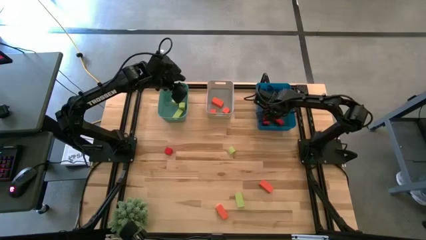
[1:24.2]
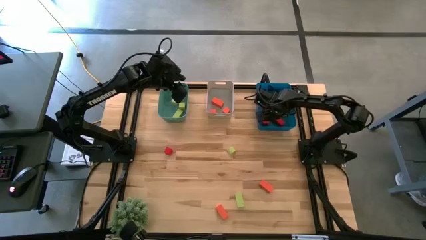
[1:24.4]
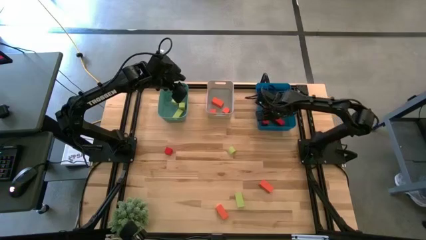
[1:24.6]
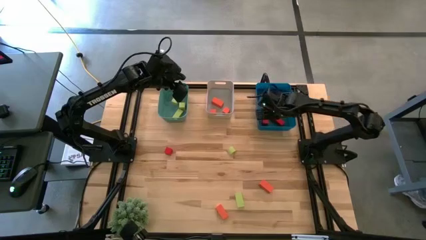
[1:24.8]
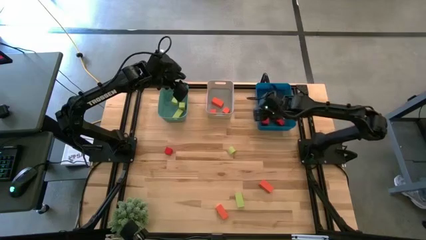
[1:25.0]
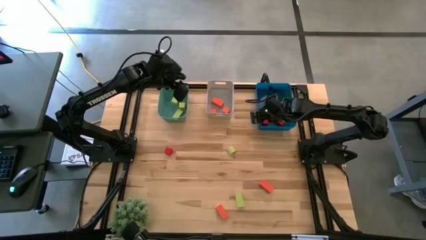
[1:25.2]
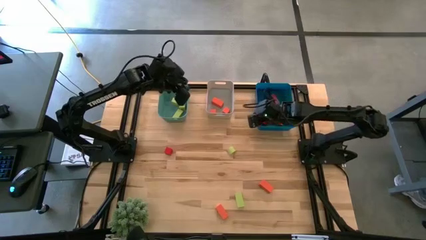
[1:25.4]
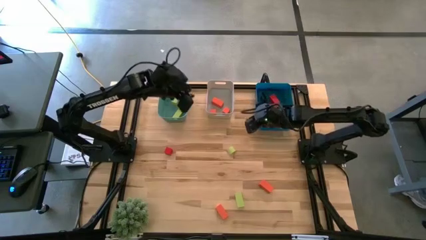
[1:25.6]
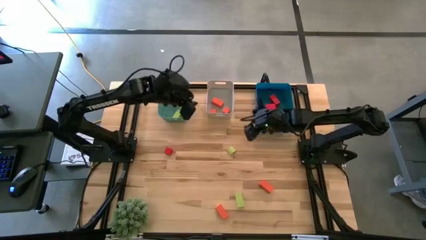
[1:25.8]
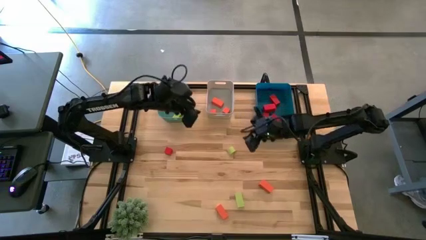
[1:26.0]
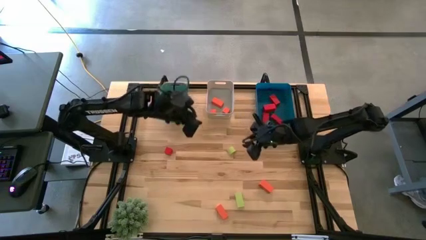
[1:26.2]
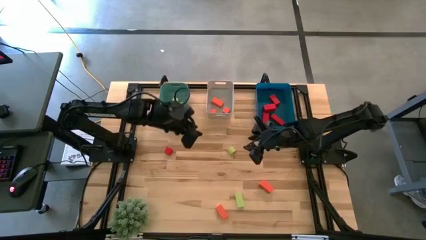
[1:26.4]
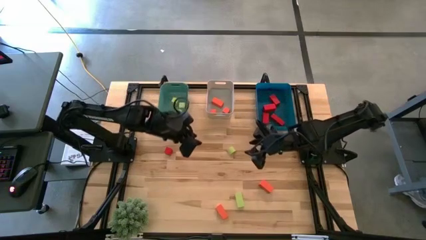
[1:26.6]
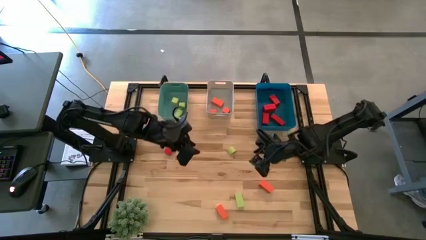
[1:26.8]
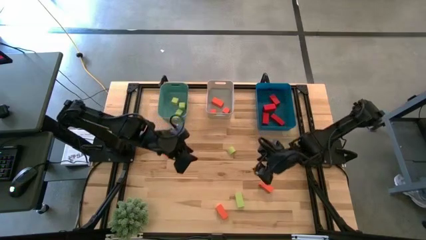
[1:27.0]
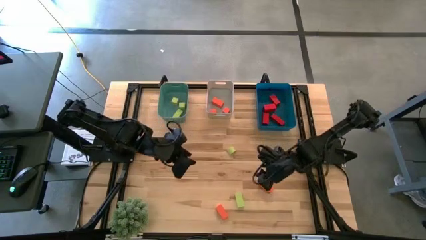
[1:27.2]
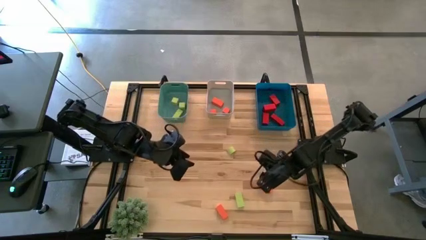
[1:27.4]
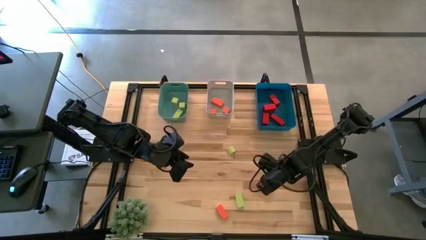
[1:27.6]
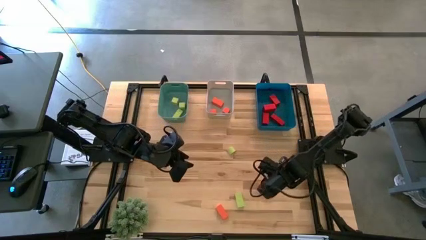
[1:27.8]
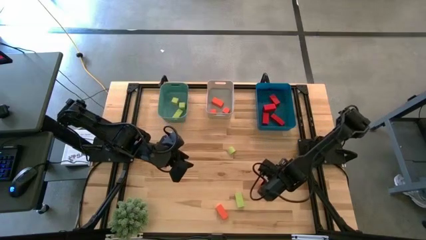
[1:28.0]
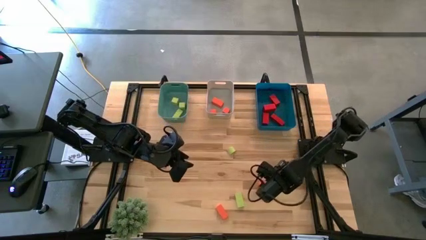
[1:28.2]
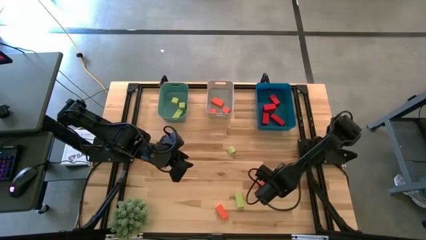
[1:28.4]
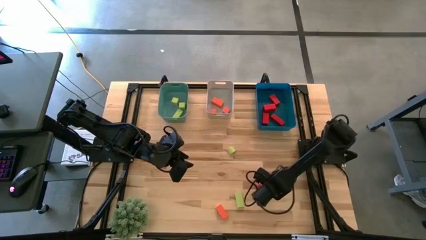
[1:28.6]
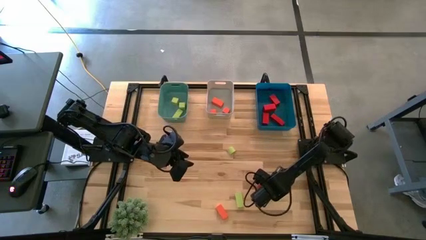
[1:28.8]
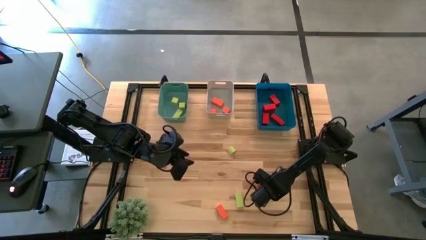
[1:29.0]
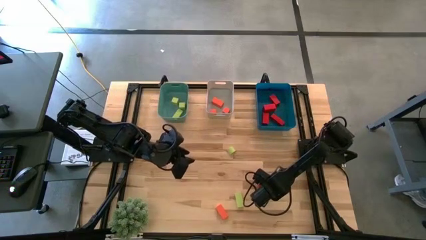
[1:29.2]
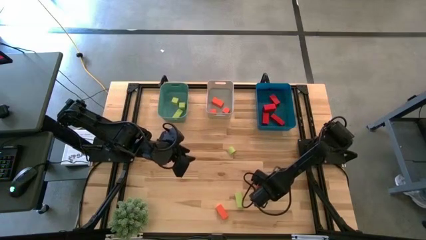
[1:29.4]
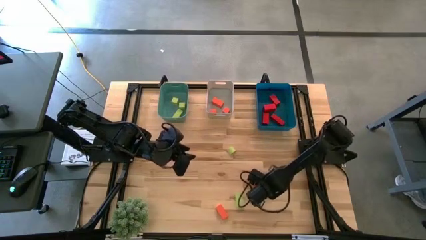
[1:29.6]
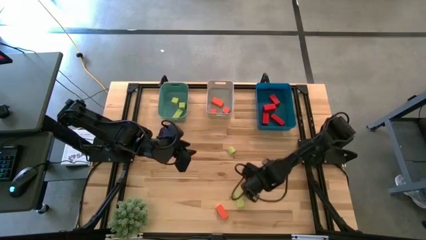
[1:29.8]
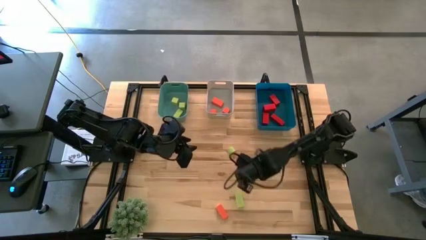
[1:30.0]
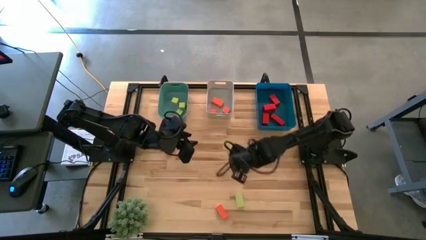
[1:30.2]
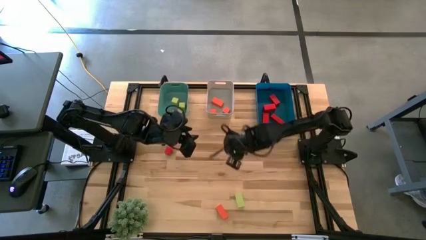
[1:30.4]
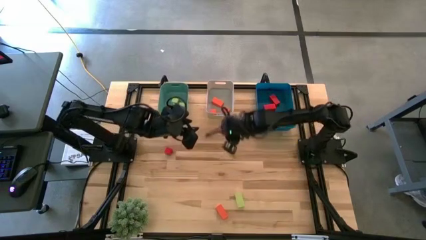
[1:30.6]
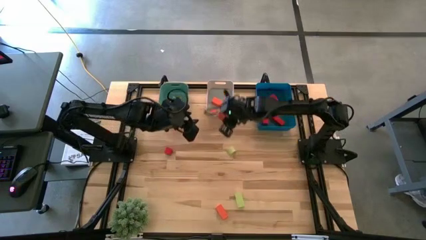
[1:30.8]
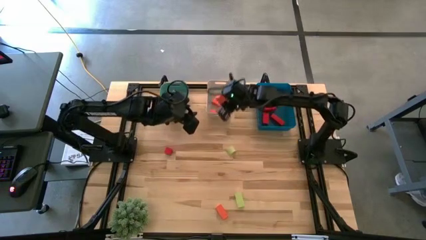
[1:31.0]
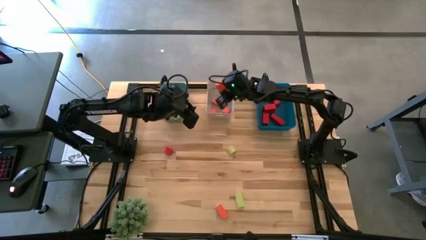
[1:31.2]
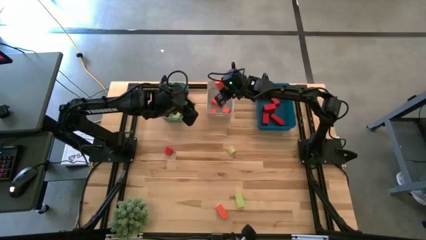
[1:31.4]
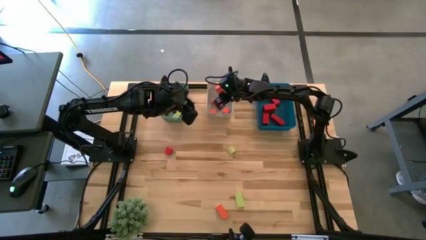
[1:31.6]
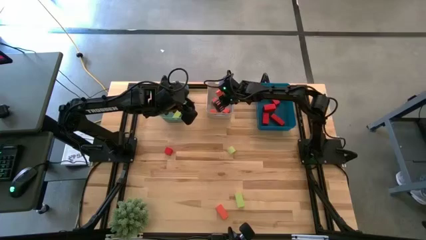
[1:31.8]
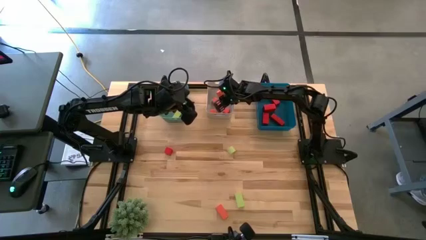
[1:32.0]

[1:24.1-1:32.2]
Task: Sort & place blocks by color
Put the orange block into the gray bin

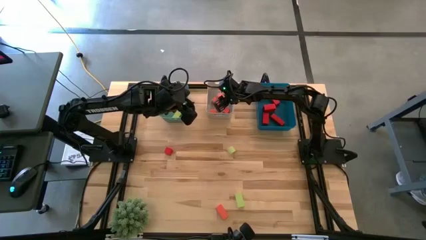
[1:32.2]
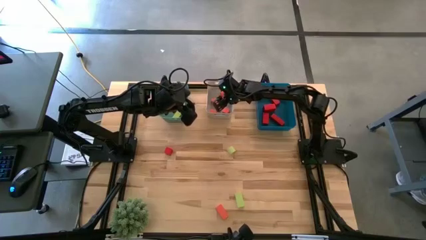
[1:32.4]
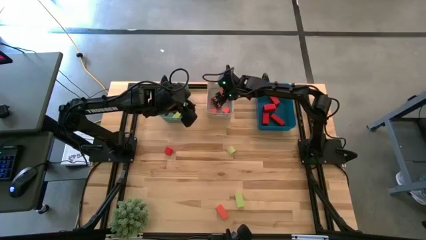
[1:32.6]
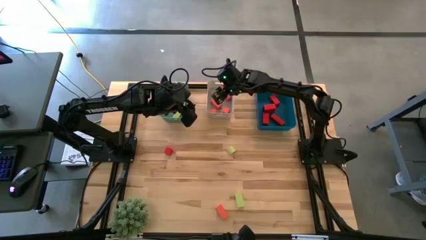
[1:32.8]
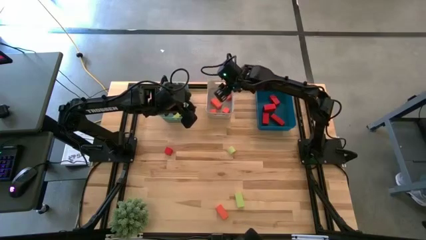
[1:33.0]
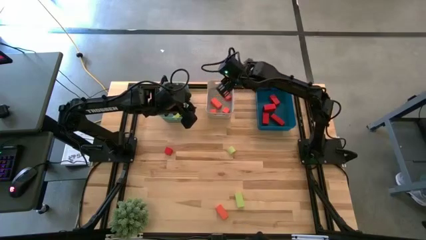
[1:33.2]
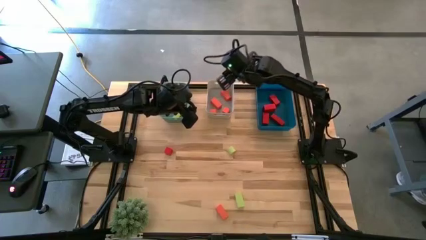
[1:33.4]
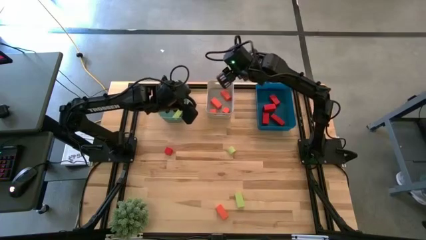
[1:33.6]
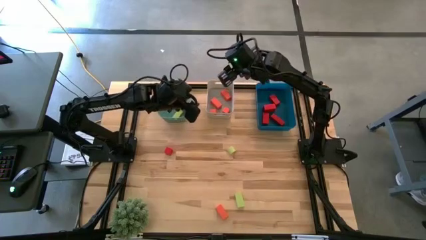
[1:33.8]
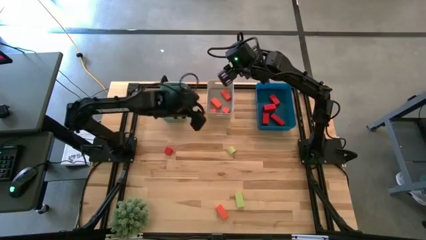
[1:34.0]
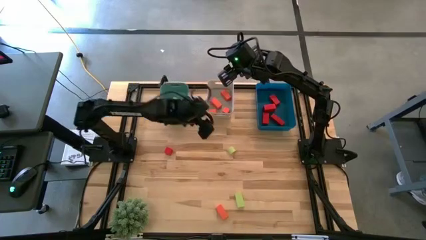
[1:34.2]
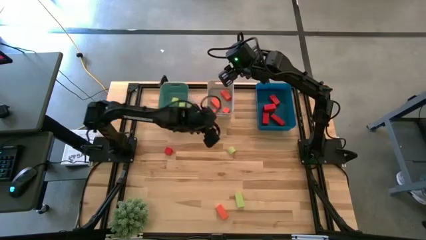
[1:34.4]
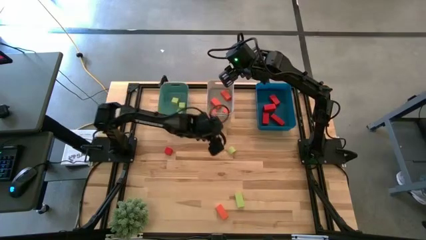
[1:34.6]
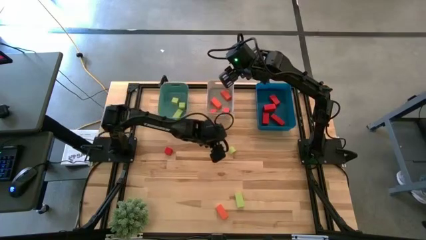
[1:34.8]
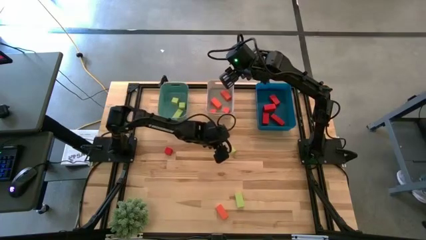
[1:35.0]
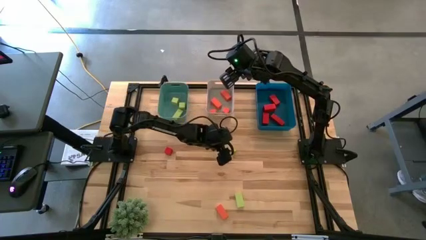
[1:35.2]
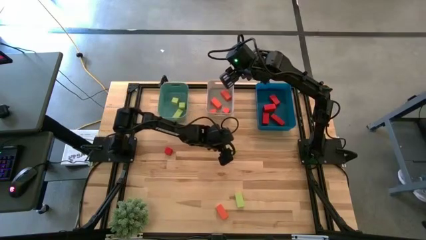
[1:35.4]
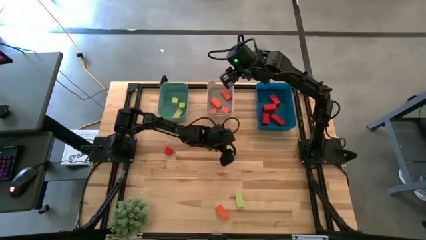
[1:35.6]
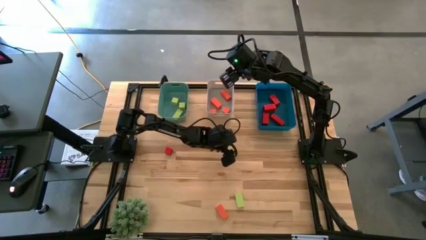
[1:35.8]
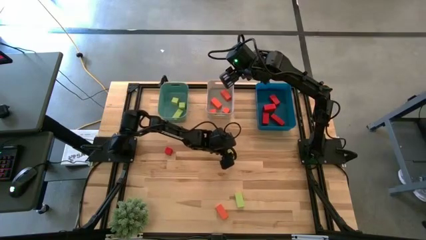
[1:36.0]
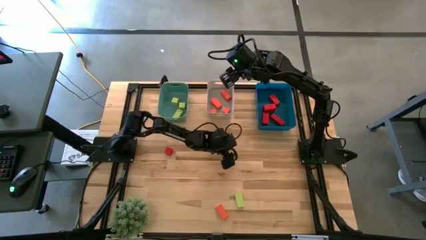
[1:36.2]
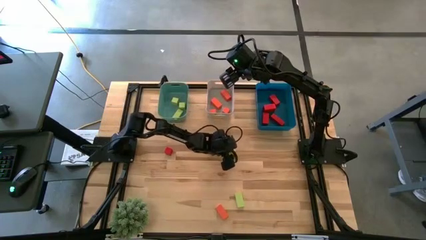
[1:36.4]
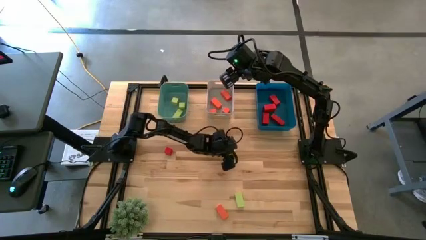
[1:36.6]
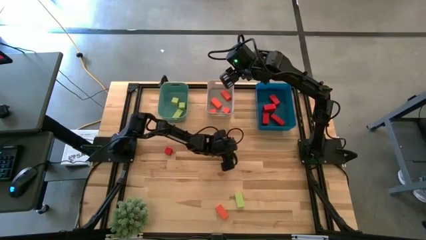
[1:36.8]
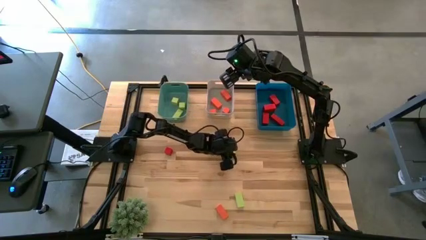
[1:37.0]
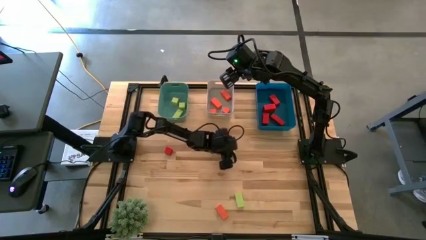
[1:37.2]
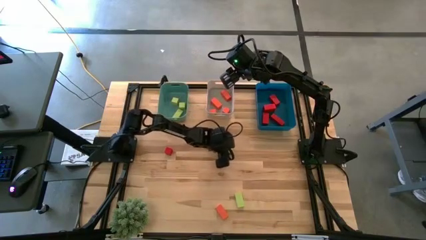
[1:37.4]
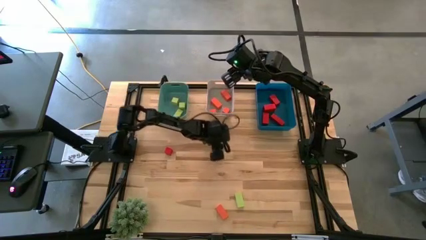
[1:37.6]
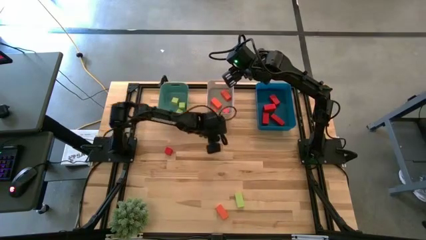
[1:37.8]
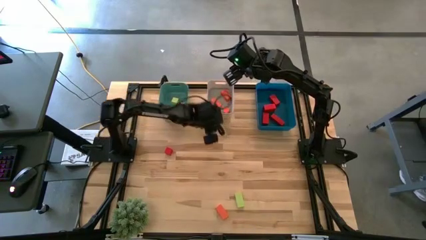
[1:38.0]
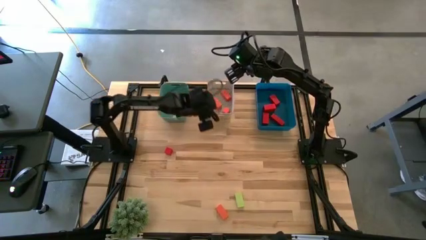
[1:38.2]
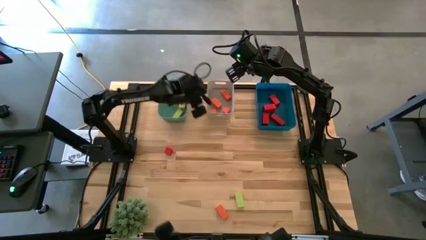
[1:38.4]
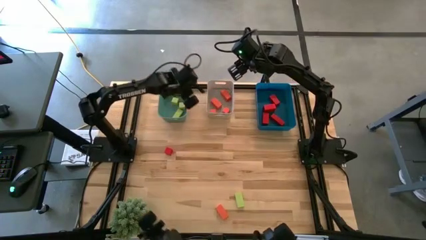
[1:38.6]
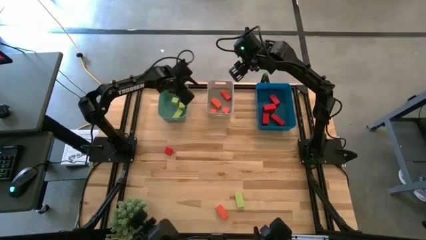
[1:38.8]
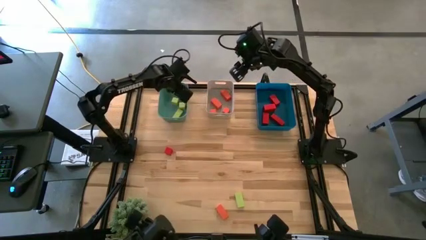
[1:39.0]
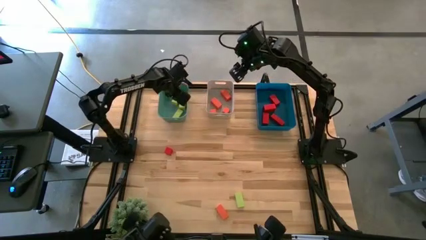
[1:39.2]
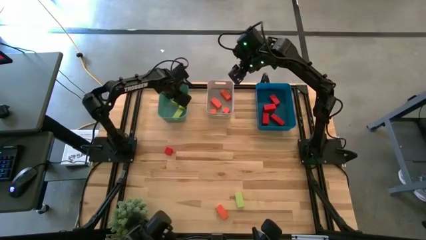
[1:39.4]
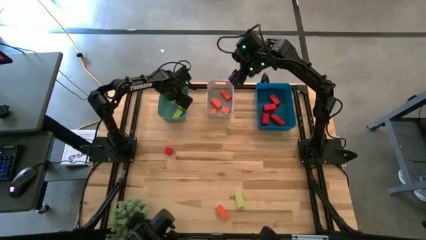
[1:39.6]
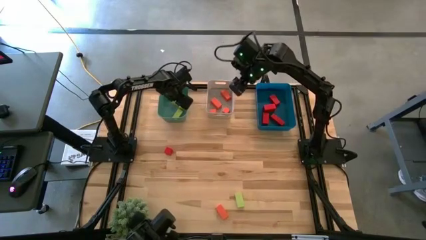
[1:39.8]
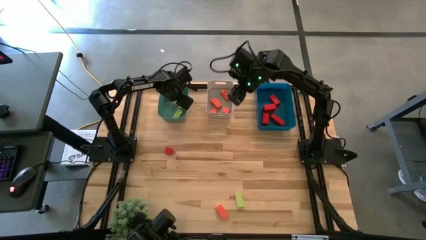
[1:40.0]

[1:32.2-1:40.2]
Put the green block into the green bin

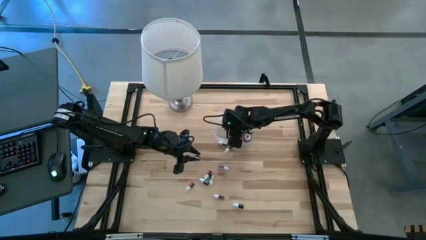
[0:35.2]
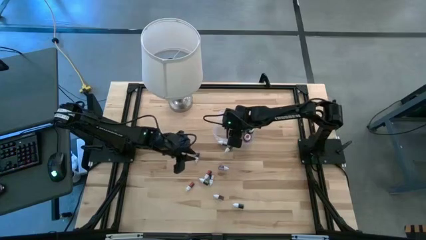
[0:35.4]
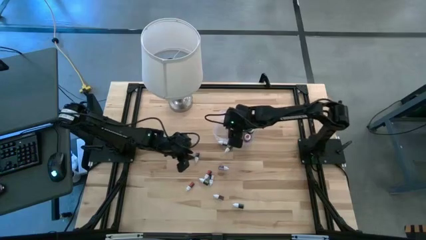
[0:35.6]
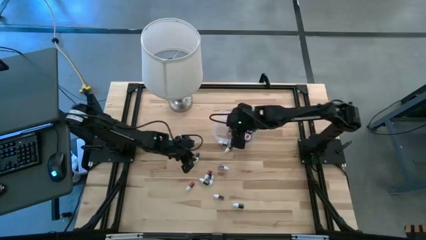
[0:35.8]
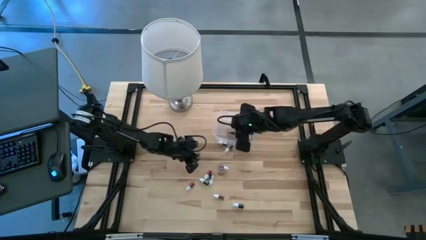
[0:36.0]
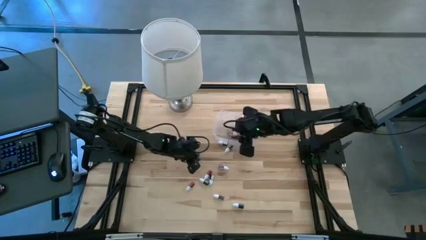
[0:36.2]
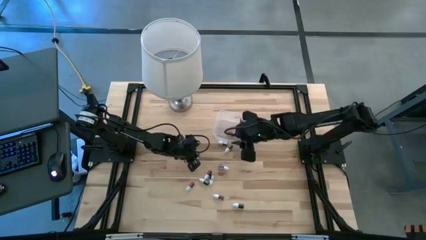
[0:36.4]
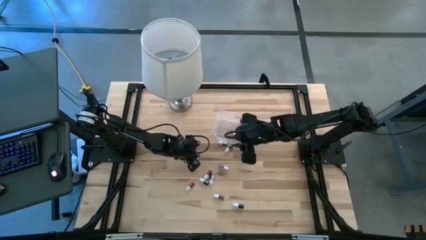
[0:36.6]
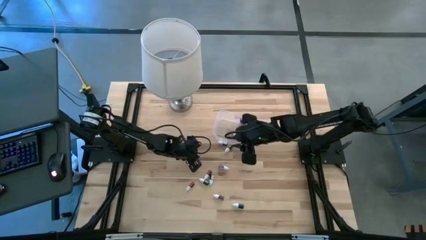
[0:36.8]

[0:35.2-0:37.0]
Task: Pick & Place food coloring
Put the left small blue food coloring bottle into the transparent bin
